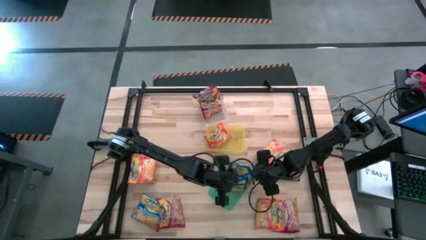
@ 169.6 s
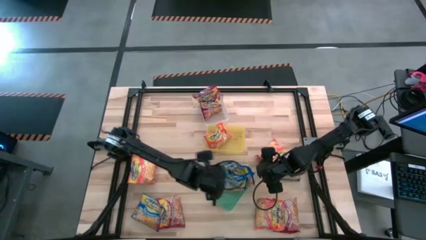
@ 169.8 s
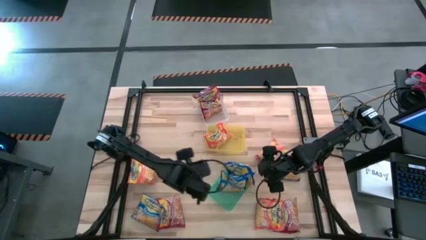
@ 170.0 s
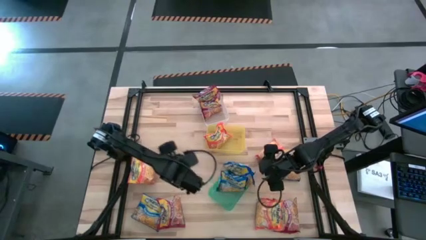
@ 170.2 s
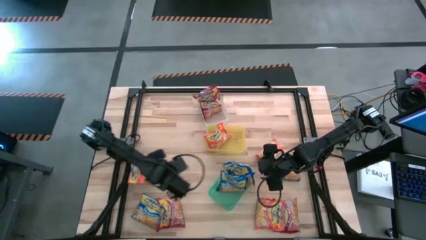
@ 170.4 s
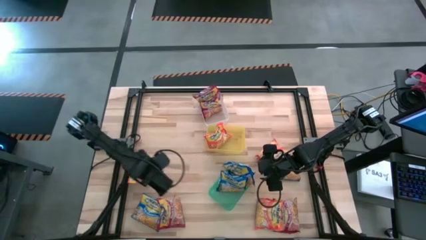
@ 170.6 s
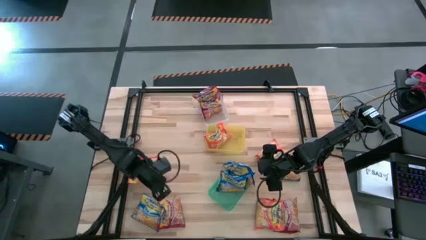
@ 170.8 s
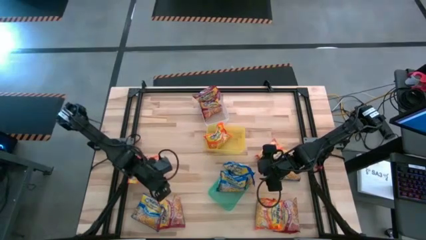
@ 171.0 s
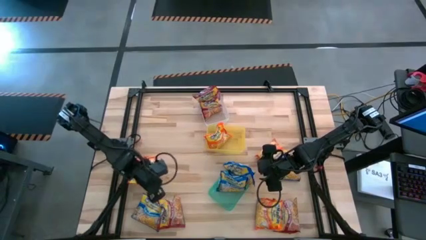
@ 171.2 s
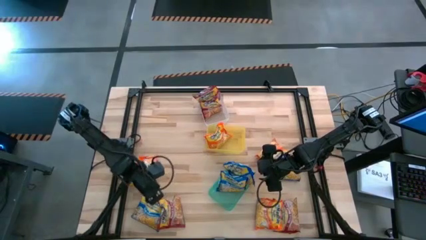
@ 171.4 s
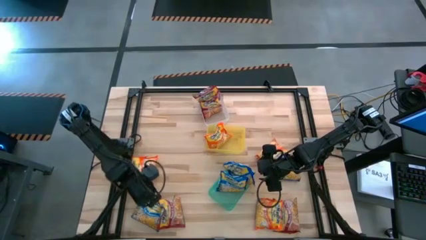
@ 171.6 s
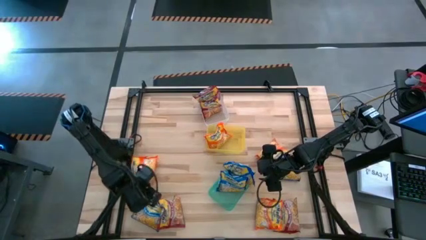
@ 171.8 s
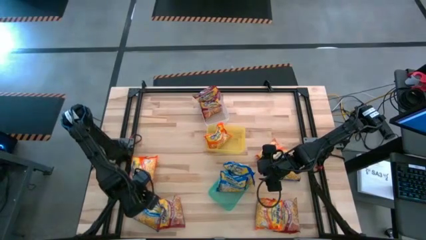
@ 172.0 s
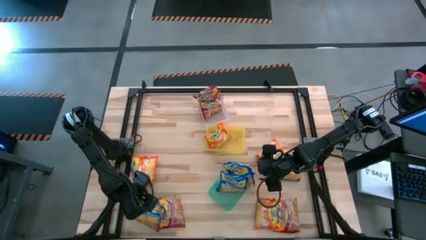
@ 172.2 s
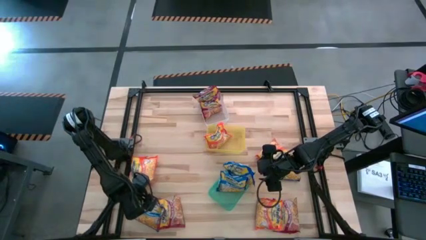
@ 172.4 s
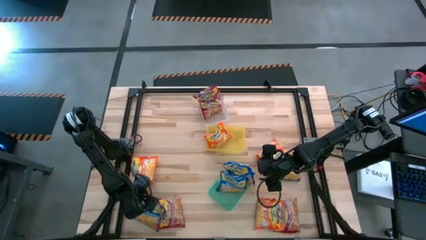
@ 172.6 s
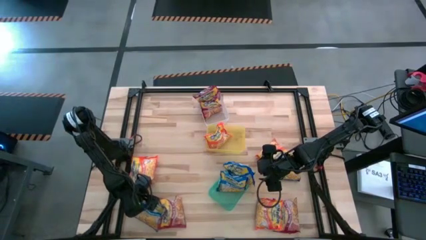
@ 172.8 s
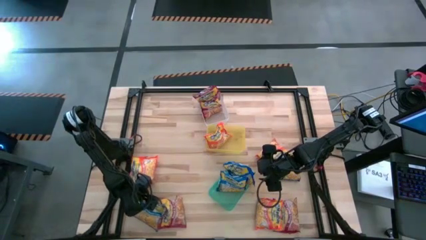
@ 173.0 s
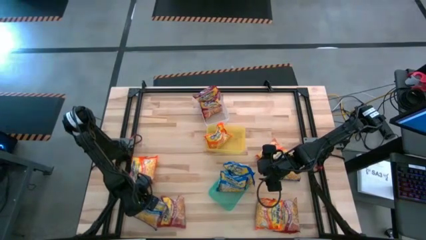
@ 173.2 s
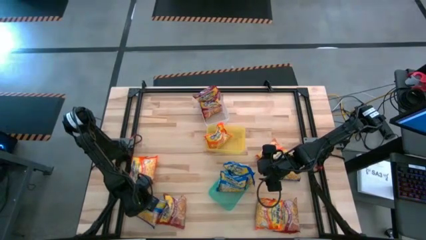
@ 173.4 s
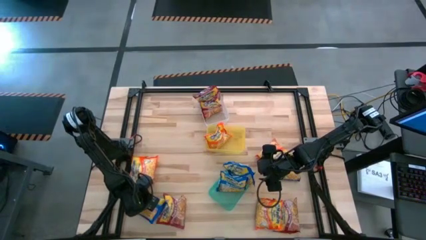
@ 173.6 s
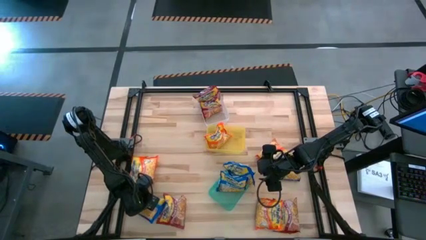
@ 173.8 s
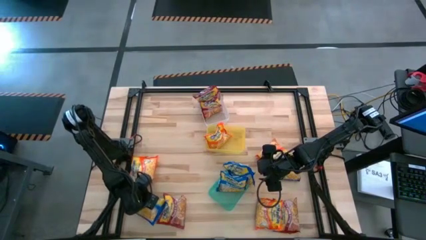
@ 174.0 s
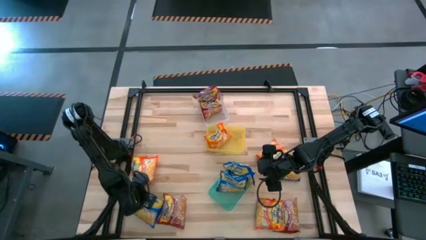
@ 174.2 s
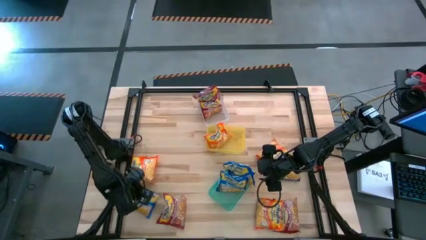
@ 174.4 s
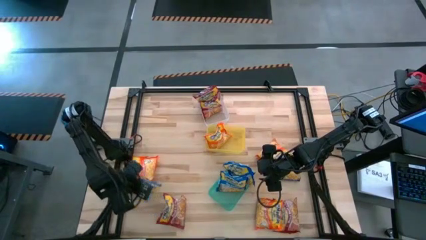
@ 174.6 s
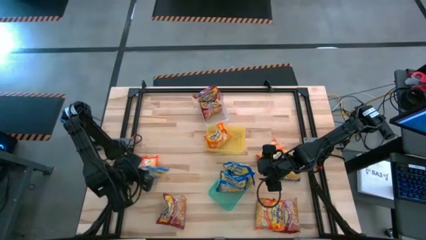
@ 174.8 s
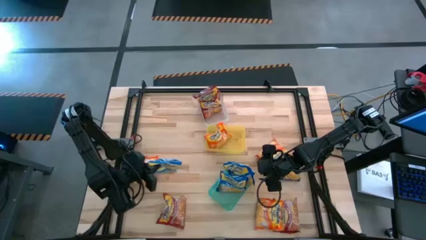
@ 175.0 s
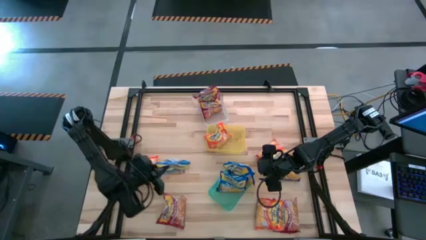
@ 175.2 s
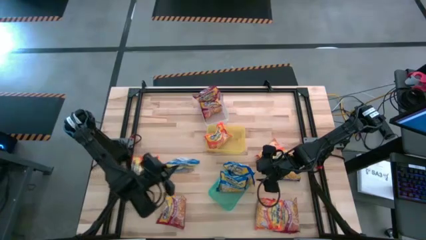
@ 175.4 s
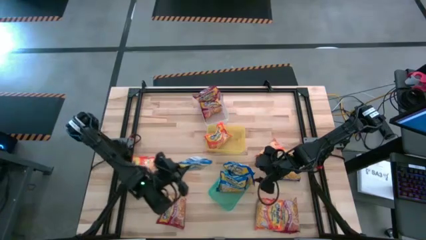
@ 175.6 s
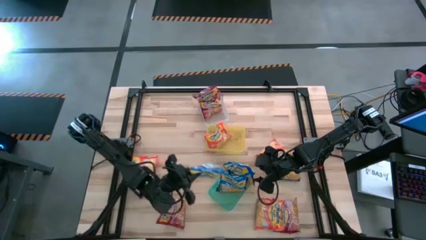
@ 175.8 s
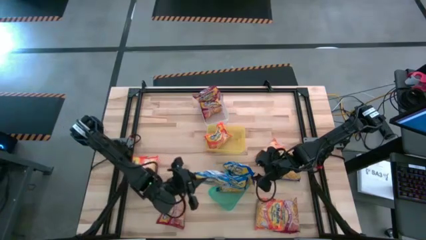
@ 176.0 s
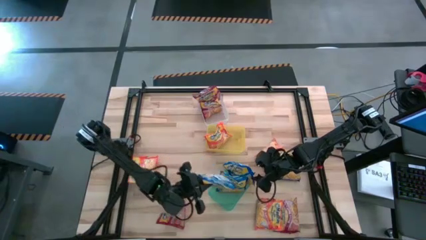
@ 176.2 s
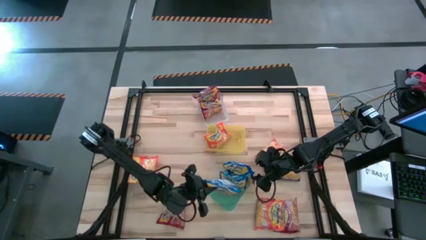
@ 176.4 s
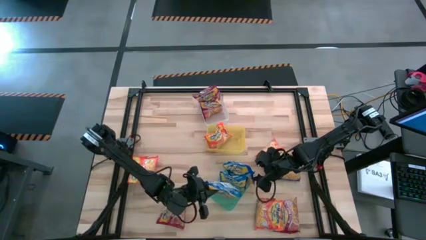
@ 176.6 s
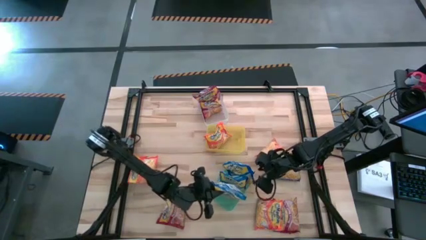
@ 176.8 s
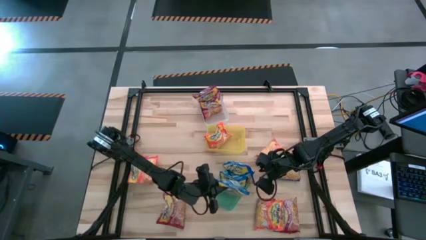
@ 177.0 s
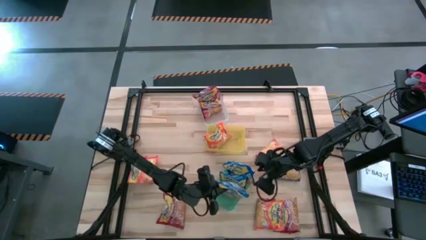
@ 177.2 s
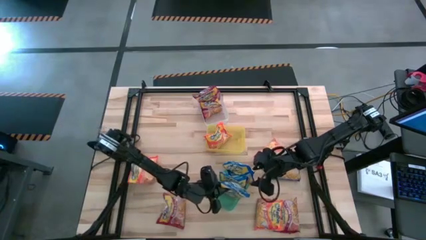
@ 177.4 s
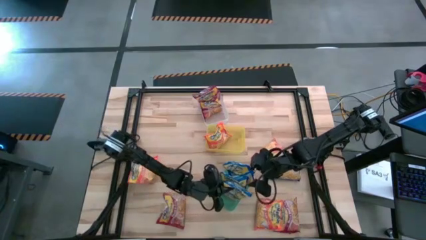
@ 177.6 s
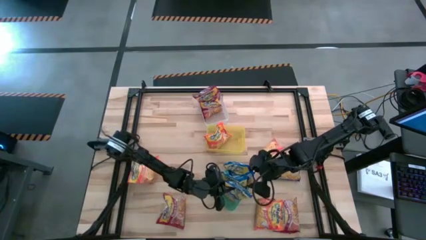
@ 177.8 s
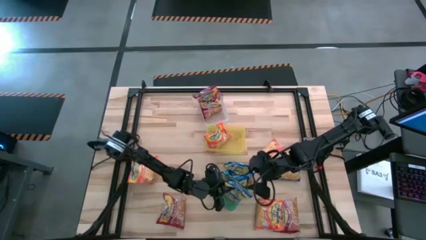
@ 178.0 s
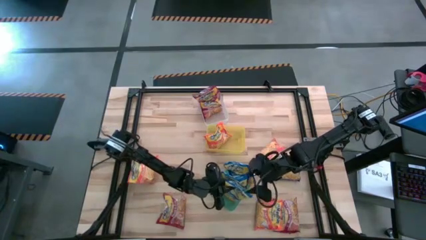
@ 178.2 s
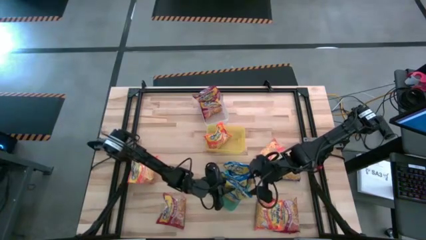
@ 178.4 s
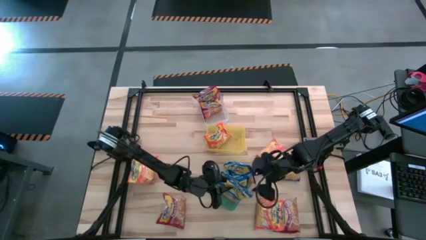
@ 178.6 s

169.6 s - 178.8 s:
Task: Sort Maruchan noodles
Put the blue noodle pack into the green bin

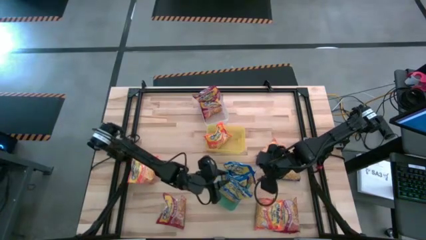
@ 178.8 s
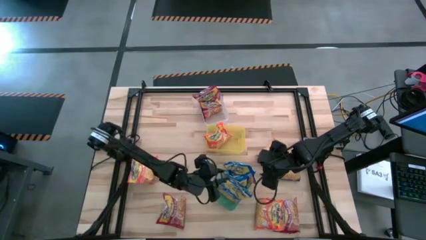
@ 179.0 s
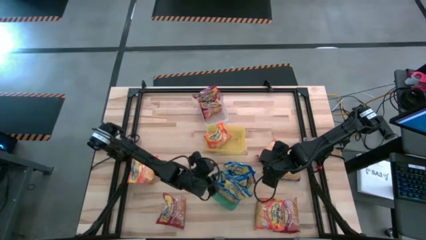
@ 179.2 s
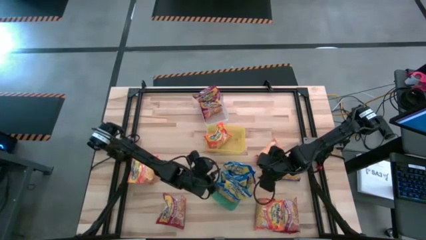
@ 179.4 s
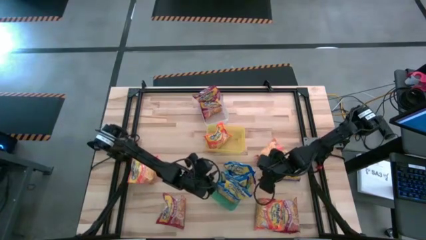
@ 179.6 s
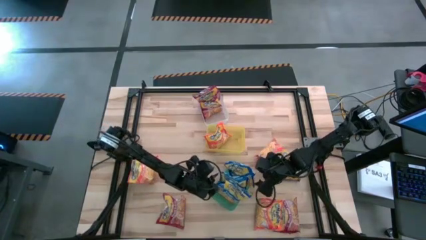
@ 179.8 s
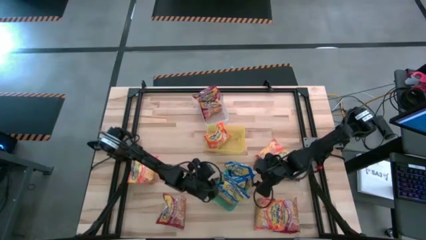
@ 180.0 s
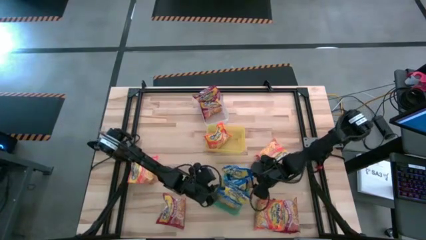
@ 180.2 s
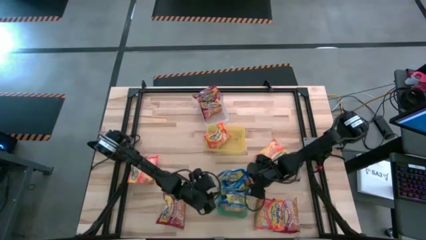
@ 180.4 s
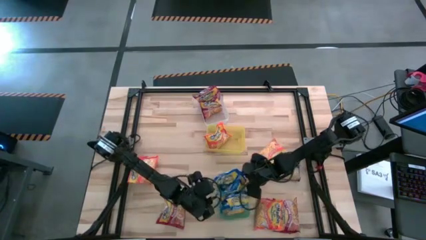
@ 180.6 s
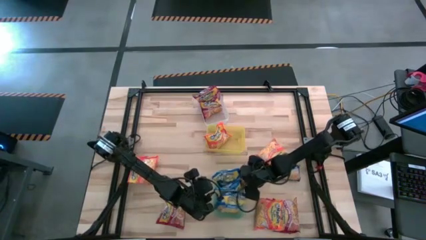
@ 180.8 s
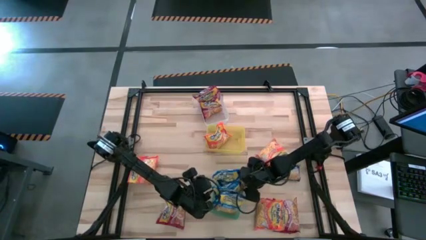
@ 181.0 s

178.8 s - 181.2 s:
Adjust the green bin

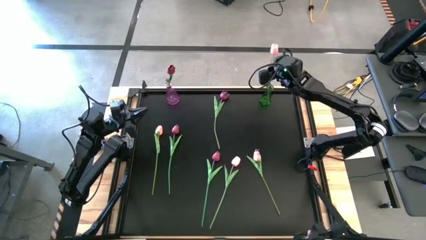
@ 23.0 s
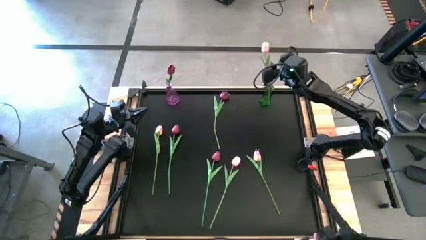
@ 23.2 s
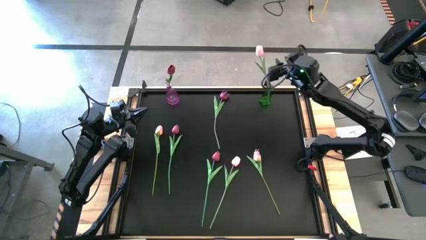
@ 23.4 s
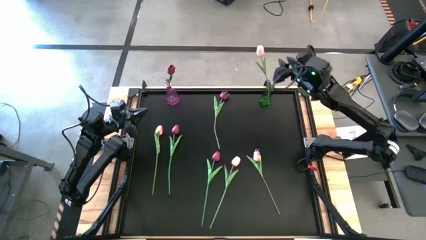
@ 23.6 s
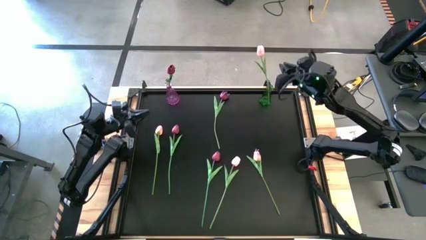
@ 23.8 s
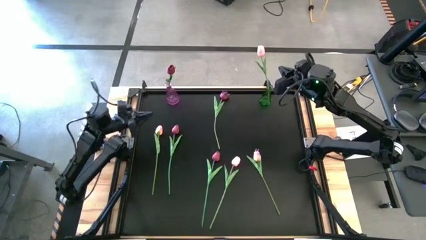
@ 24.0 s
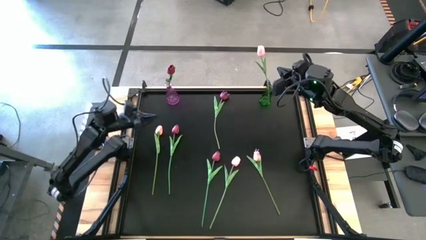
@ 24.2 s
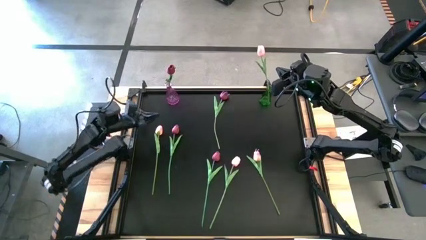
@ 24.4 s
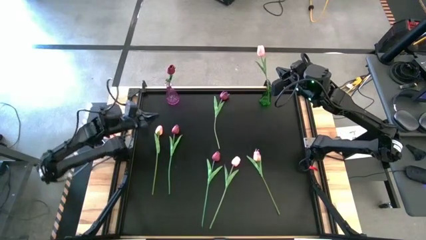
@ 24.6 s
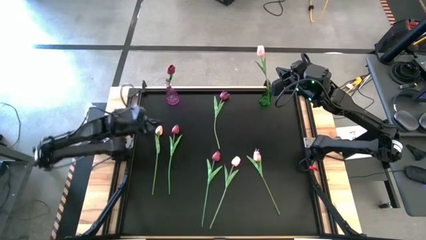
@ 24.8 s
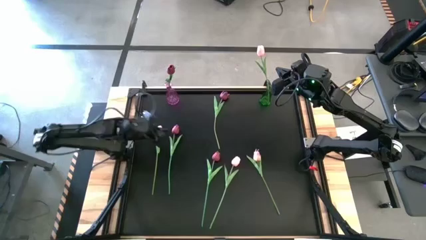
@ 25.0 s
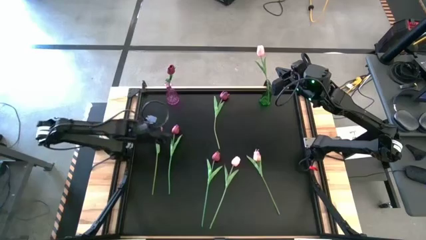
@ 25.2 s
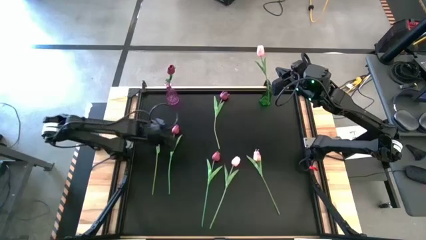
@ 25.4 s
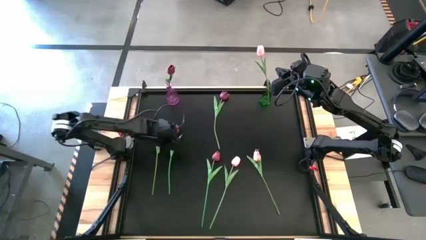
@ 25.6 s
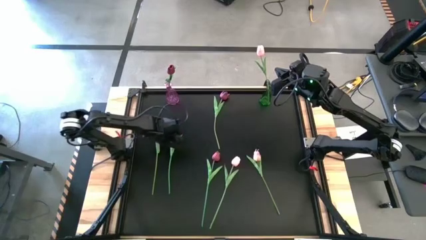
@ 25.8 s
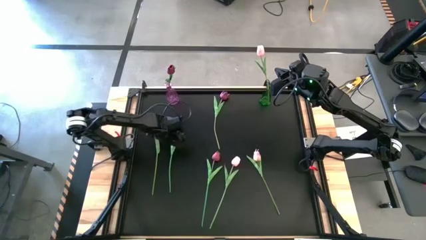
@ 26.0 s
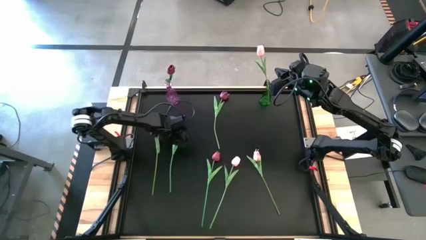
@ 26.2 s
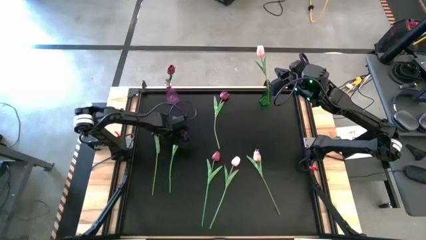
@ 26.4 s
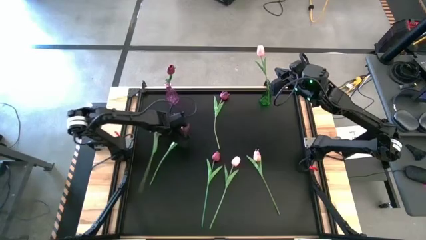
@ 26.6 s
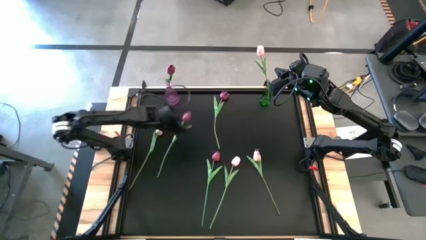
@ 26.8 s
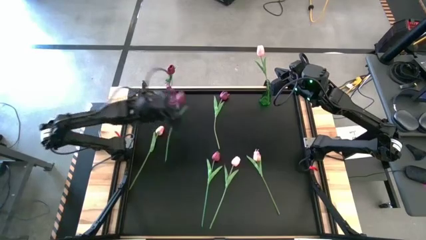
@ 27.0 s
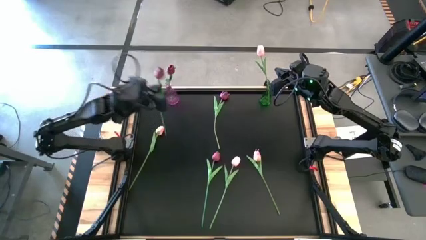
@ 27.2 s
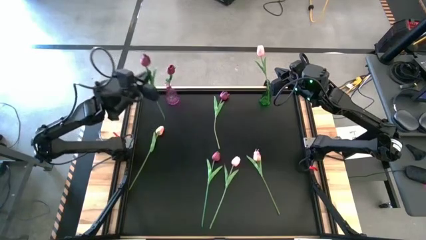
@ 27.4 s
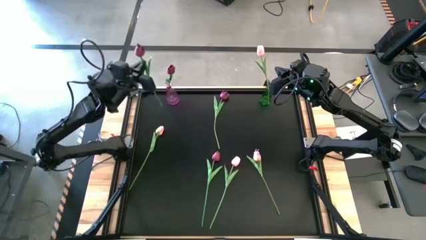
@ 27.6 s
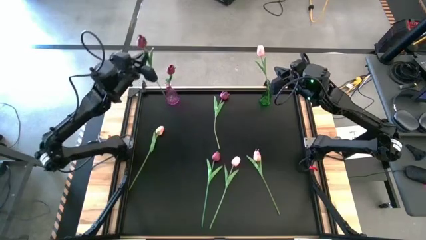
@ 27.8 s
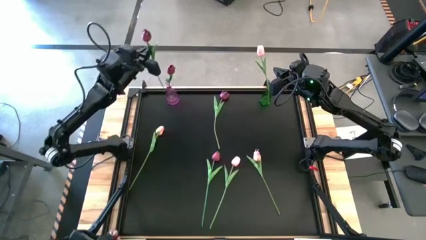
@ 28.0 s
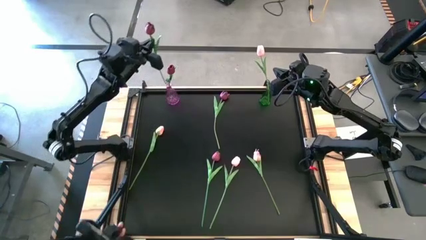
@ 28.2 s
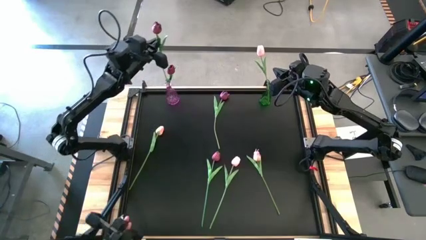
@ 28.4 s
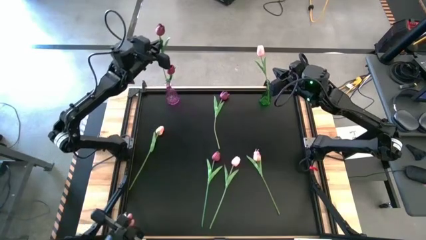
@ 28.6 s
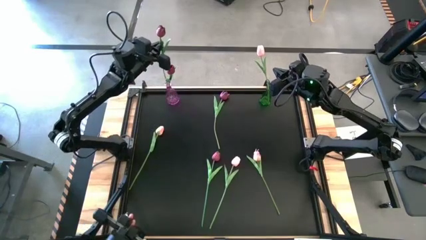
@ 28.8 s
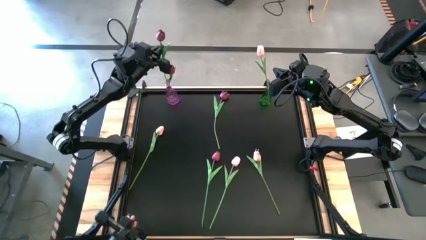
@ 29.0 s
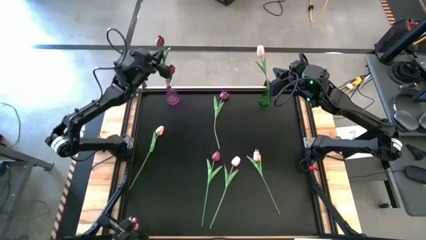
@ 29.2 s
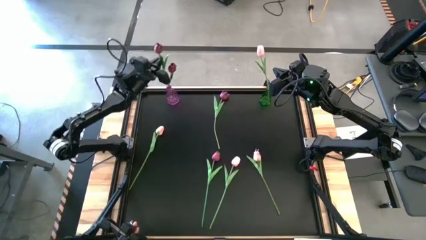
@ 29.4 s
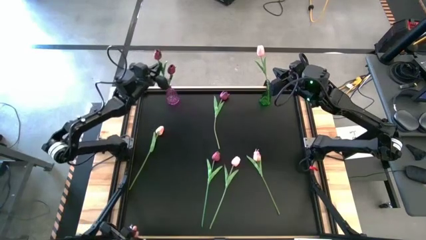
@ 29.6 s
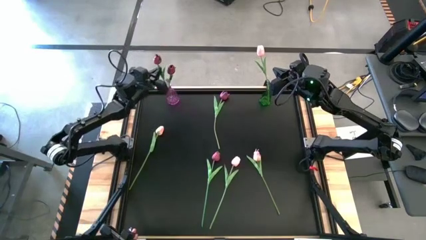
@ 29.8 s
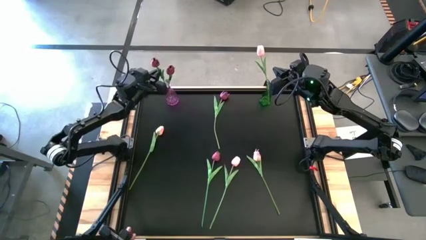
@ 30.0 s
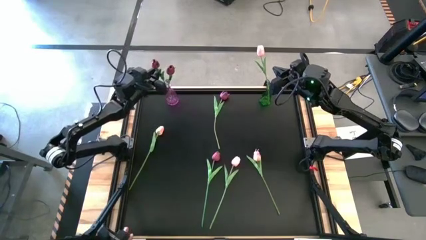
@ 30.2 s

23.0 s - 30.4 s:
Task: Sort flowers into vase by color
Put the bottom left red flower into the purple vase
